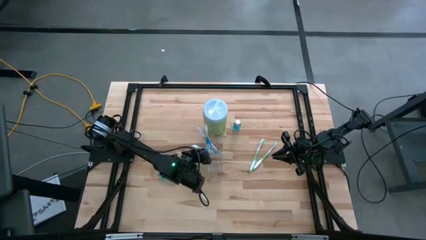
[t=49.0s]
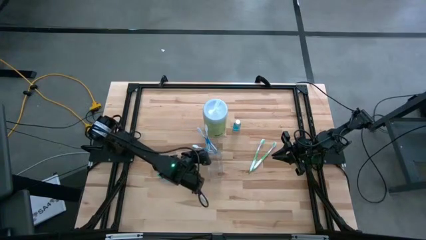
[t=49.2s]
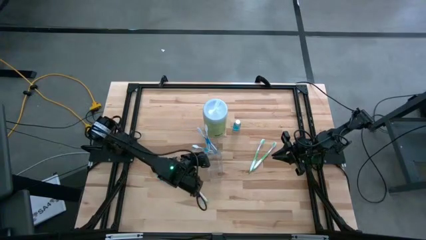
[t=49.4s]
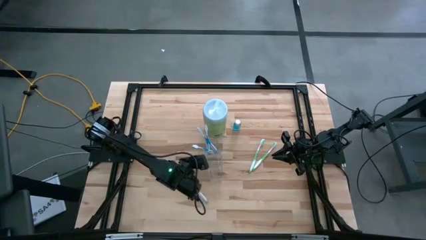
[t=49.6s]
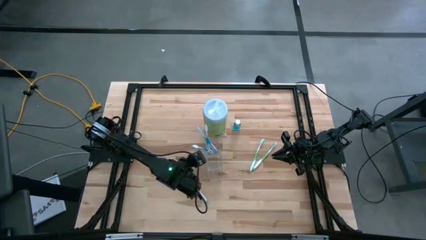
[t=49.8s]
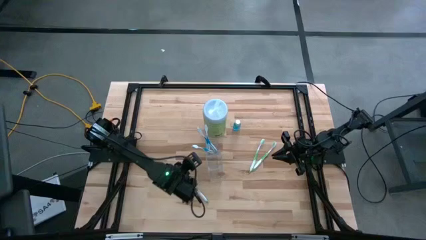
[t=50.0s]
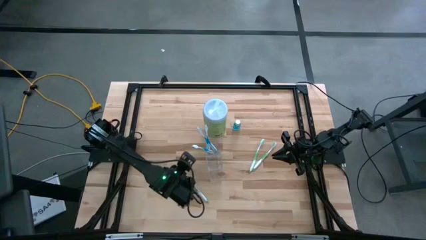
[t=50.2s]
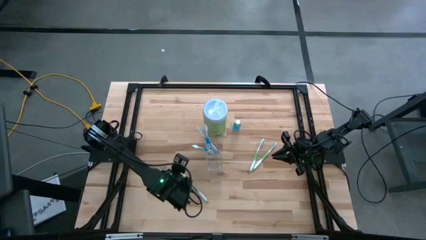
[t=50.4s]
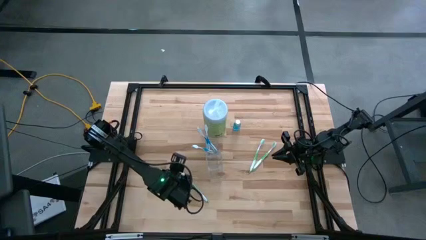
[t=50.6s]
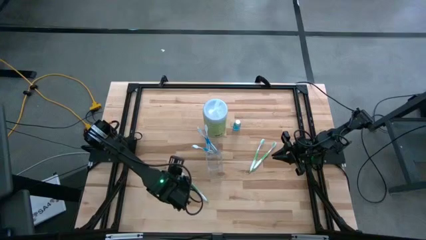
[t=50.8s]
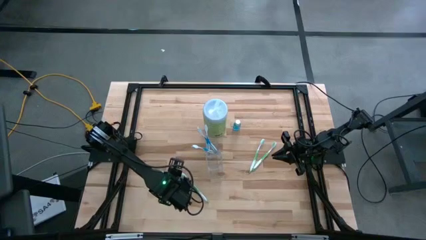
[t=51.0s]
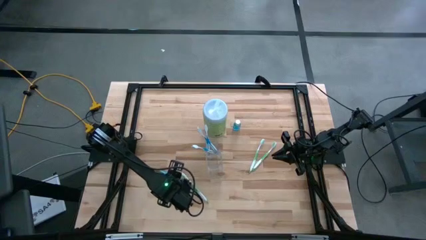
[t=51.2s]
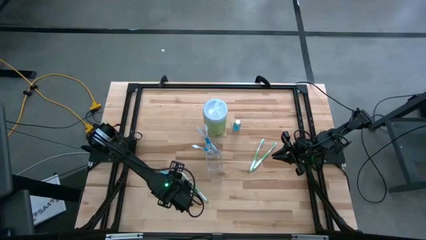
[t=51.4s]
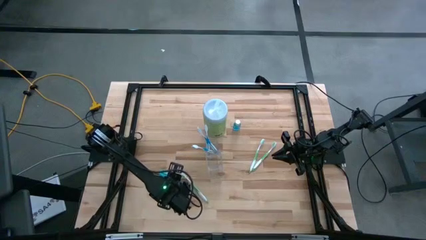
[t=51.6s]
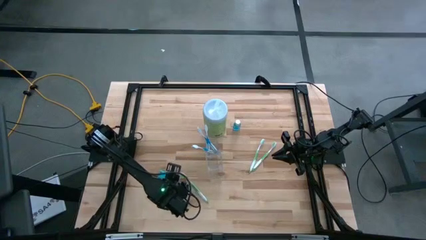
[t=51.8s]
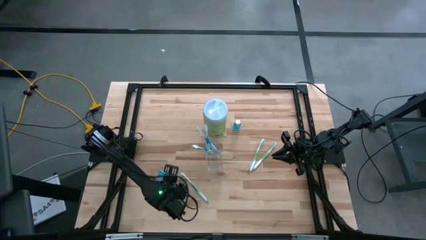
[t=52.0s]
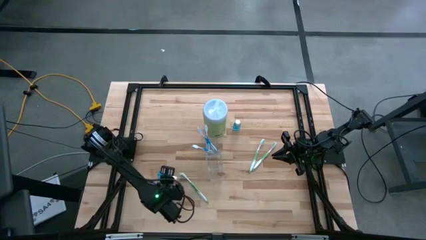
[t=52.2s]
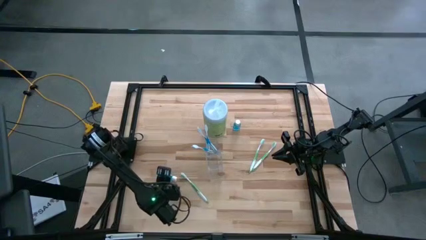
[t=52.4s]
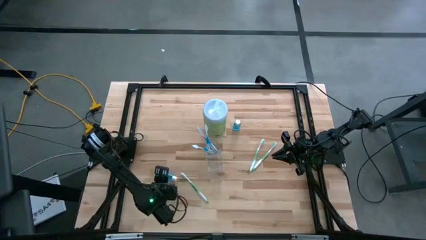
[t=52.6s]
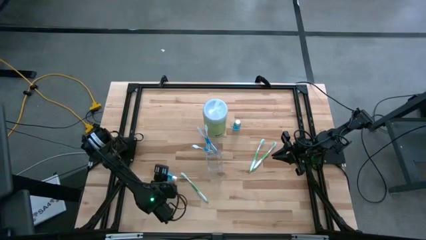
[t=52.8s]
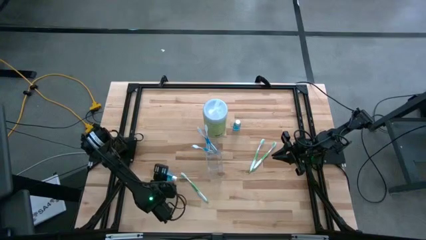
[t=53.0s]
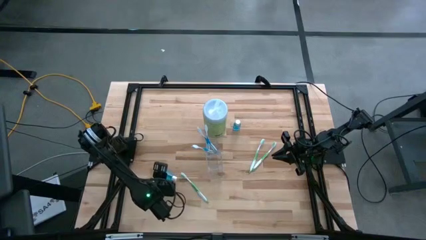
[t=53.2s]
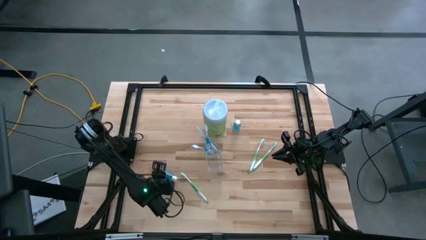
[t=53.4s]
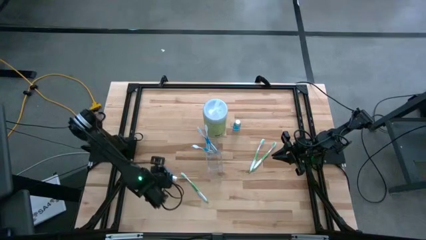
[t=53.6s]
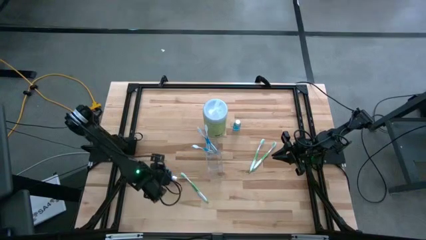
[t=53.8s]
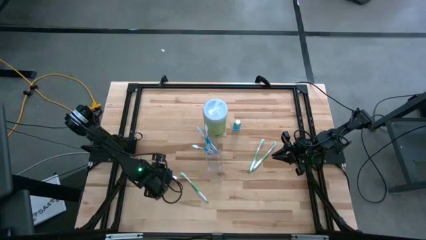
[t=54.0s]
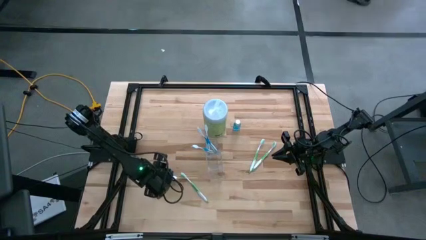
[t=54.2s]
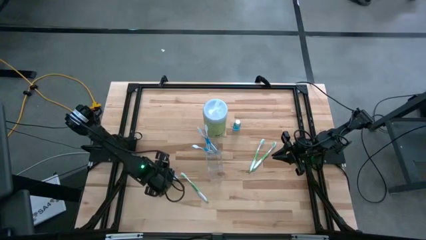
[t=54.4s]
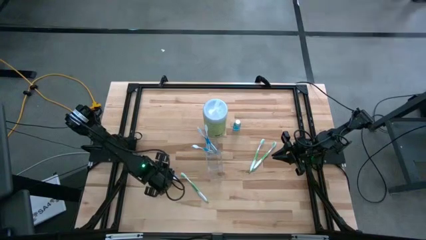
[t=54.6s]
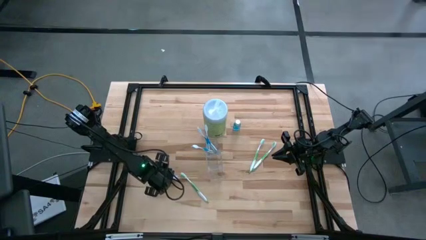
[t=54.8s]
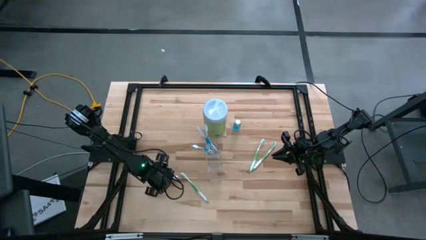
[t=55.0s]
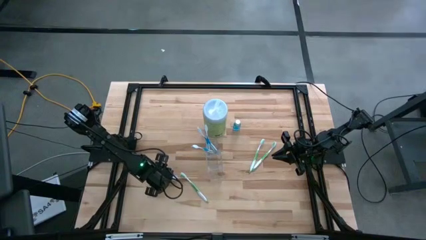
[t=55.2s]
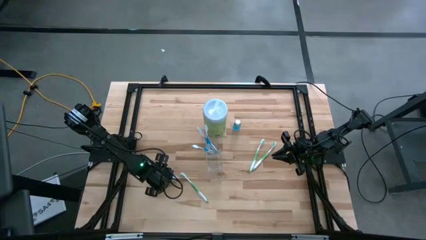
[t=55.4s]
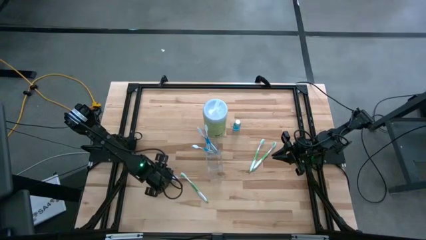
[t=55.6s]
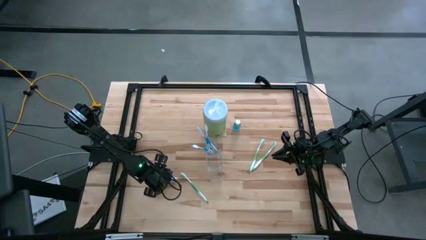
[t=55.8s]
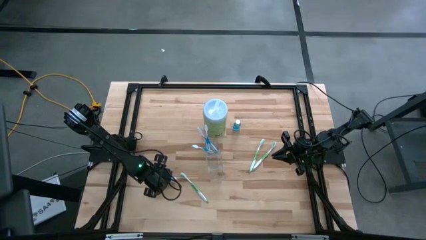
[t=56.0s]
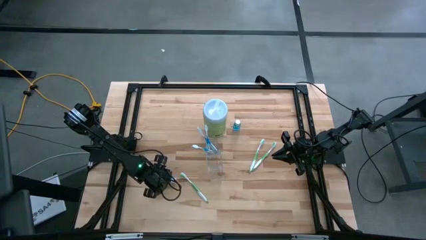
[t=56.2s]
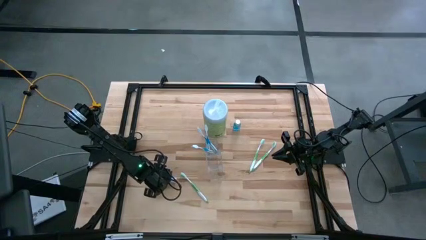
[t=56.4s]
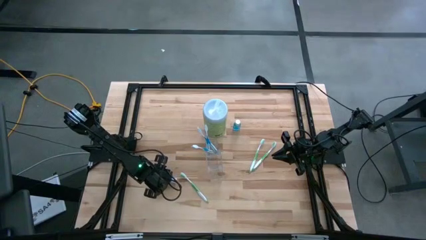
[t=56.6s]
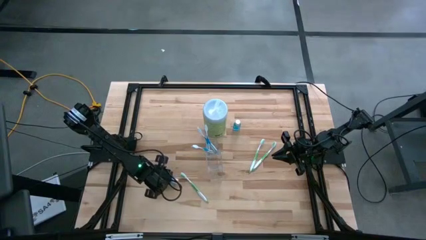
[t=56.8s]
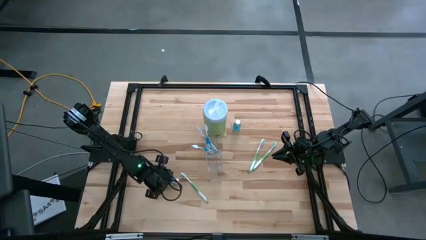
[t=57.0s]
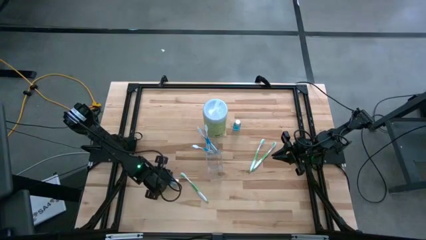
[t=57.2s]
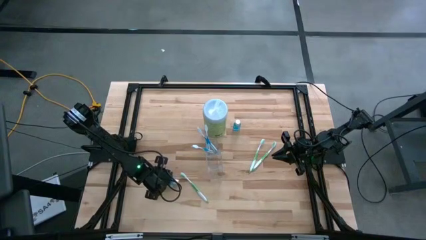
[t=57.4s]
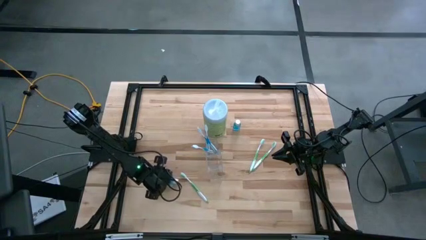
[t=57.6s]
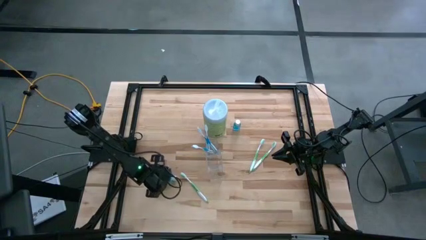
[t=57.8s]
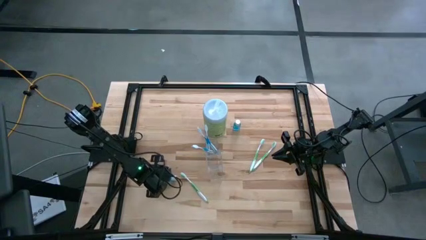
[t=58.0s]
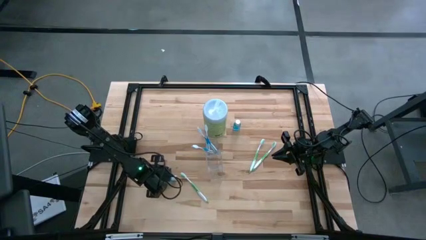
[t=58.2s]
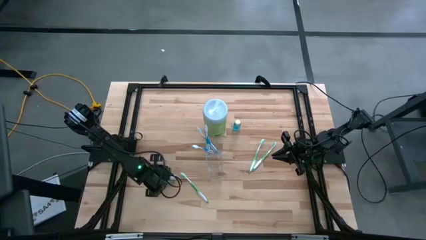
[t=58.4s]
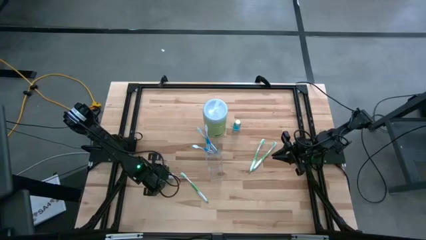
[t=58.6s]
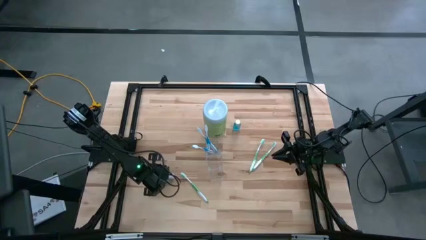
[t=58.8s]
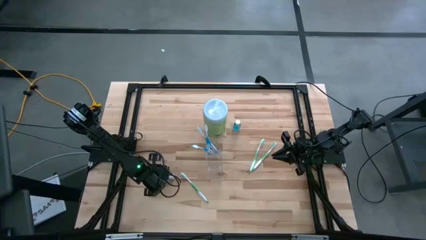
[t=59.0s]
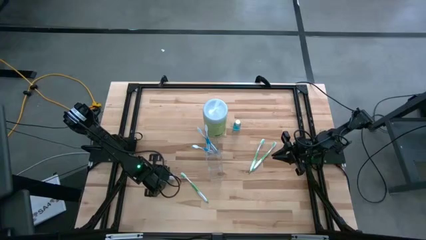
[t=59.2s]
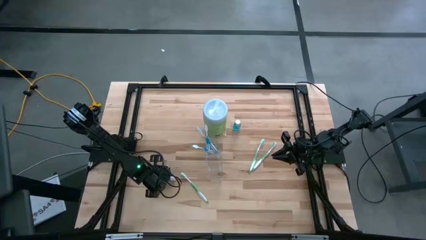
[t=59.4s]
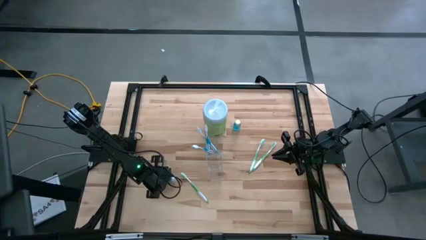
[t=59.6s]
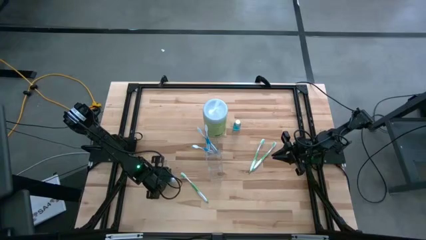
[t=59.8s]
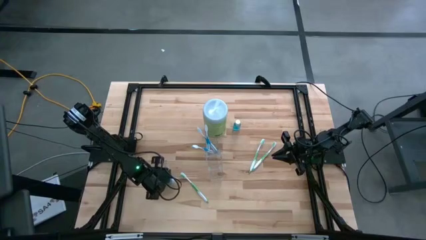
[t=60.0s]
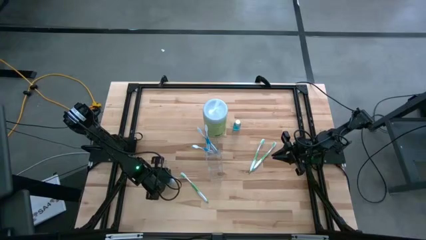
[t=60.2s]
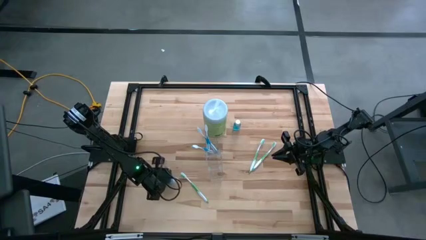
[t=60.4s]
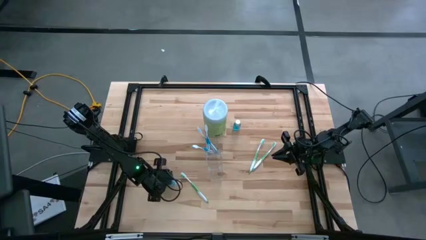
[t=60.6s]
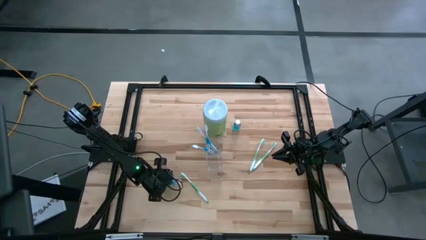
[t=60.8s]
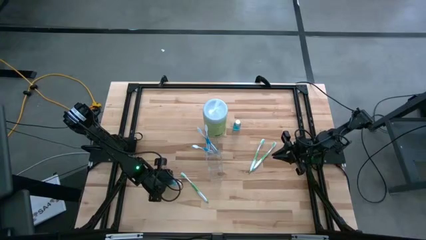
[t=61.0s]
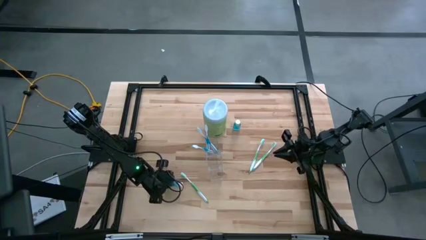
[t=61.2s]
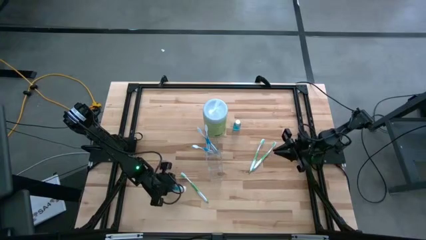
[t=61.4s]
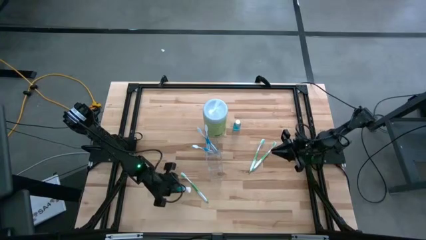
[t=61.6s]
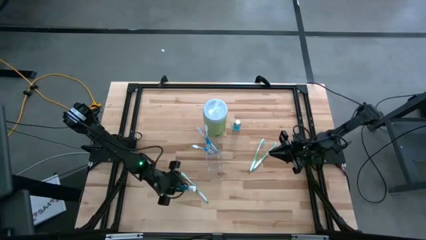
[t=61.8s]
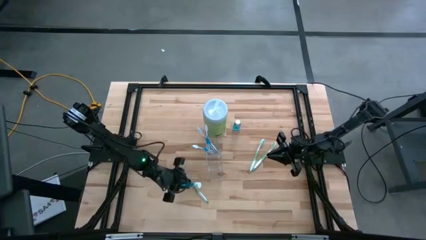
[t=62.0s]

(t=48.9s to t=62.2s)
Task: Pick & Place toothbrushing station
Put the bottom mouthwash into the transparent organizer
